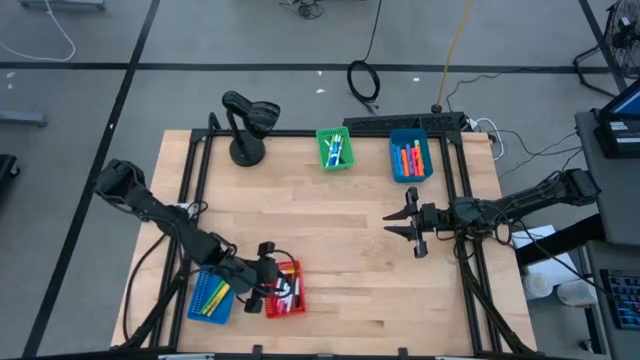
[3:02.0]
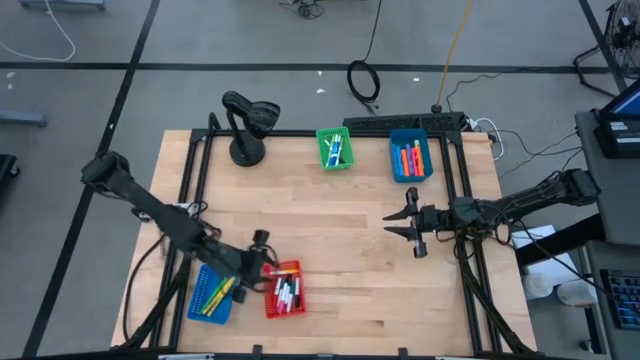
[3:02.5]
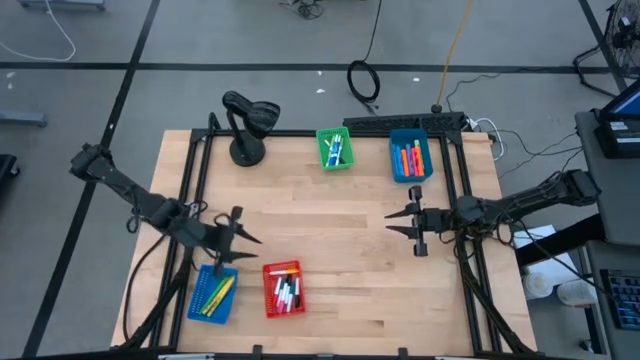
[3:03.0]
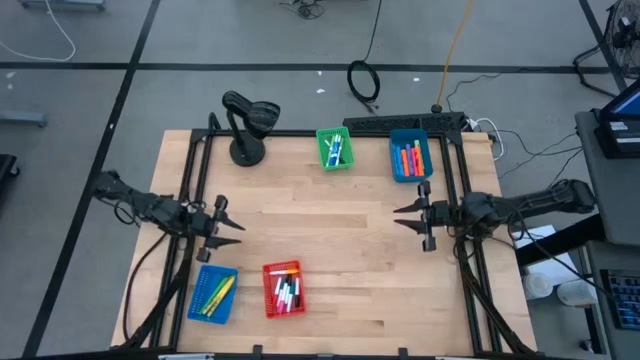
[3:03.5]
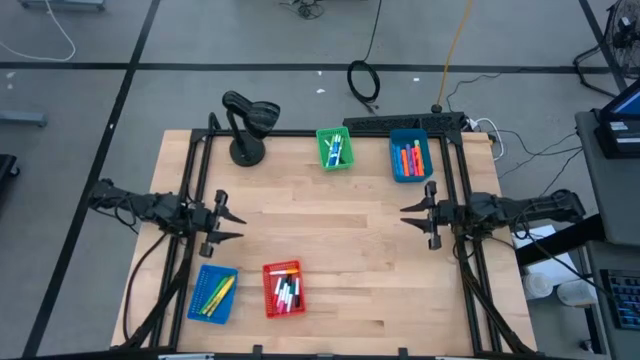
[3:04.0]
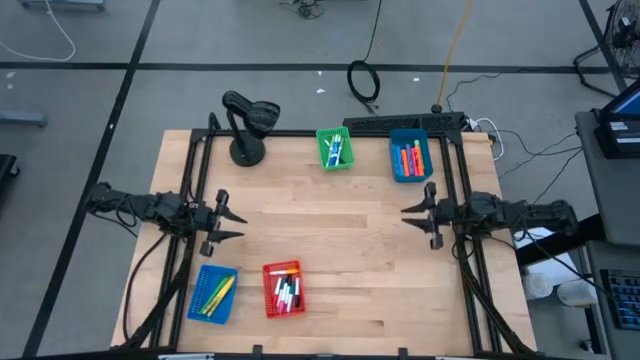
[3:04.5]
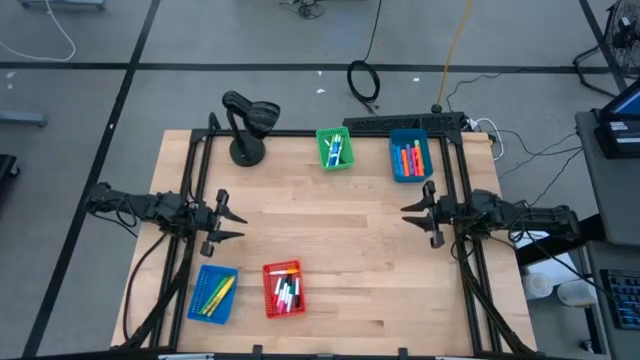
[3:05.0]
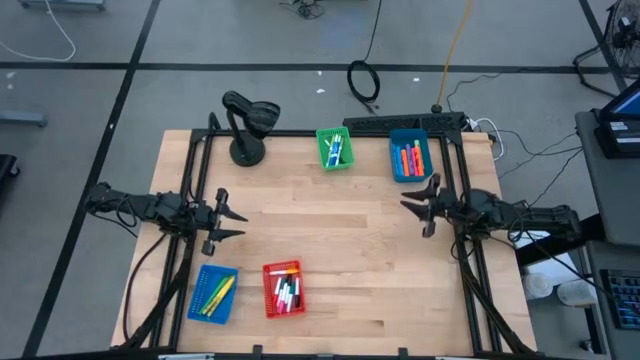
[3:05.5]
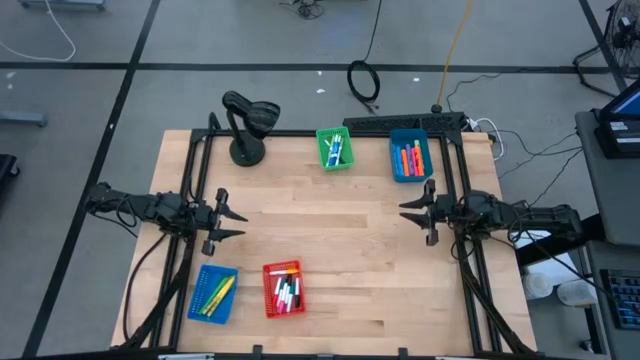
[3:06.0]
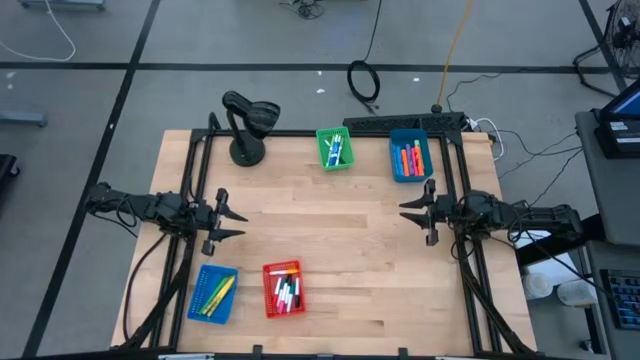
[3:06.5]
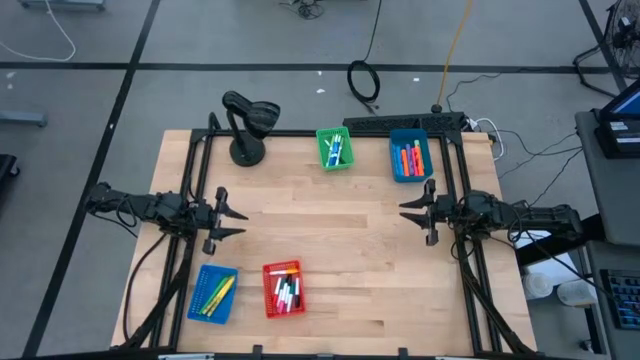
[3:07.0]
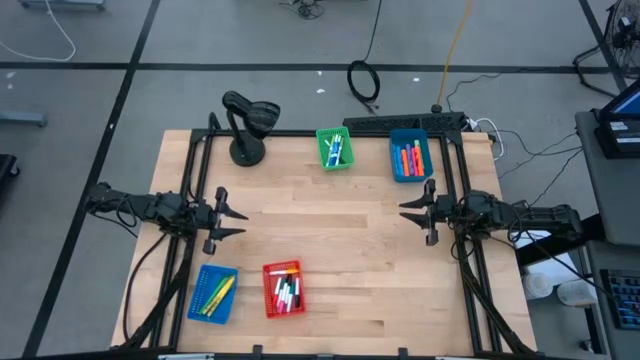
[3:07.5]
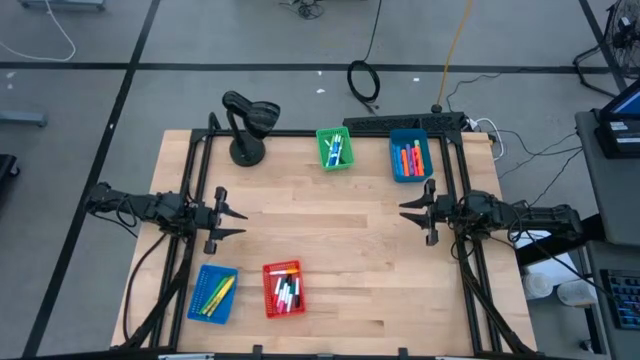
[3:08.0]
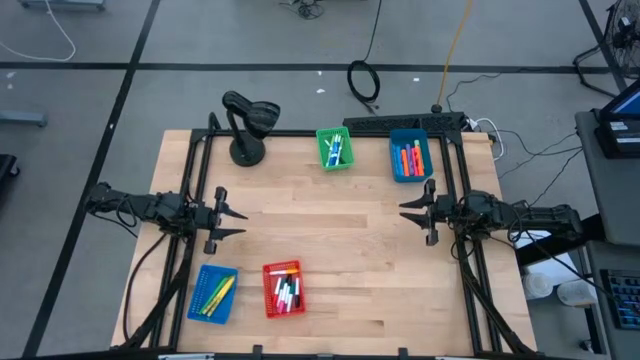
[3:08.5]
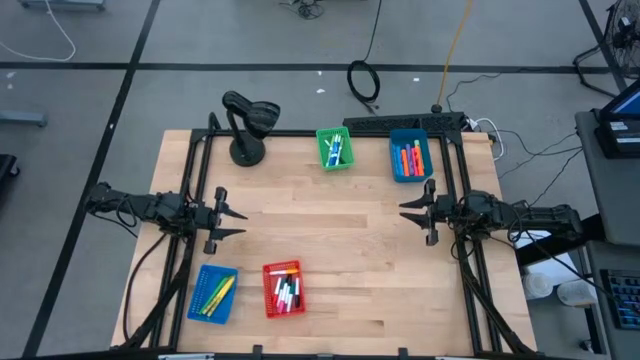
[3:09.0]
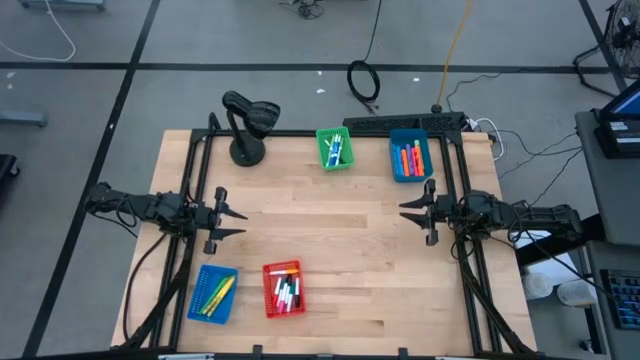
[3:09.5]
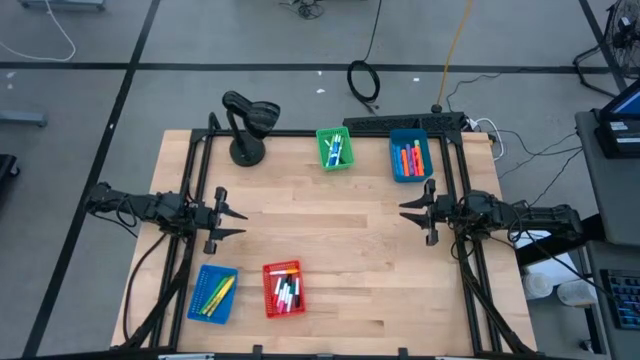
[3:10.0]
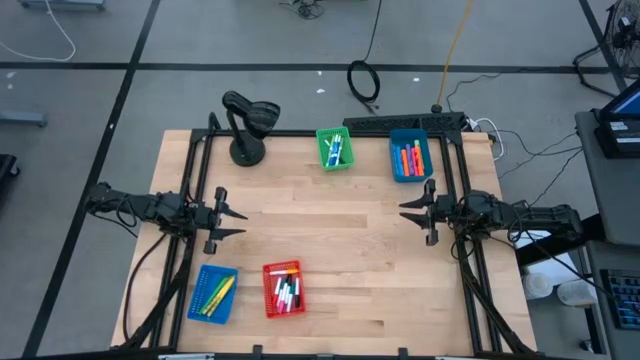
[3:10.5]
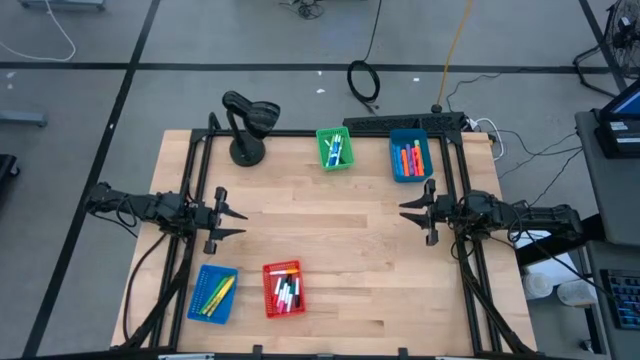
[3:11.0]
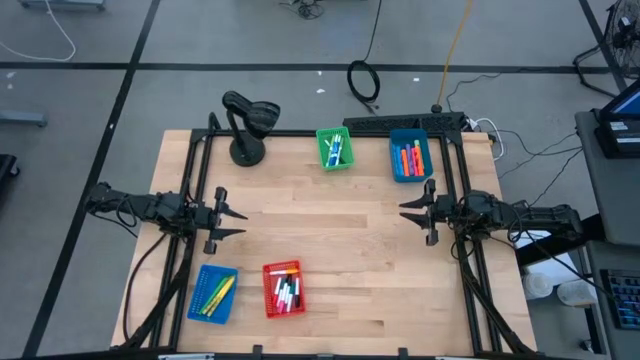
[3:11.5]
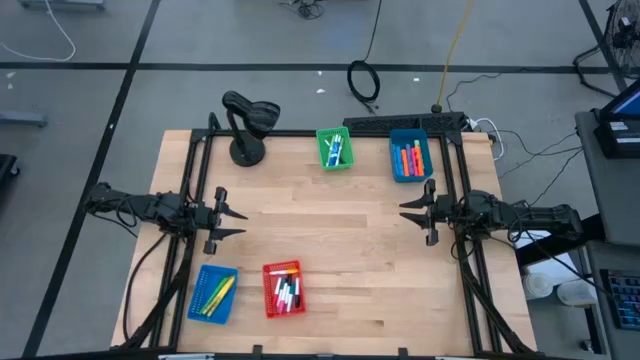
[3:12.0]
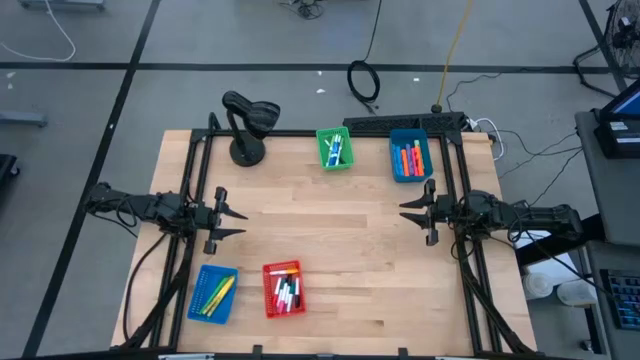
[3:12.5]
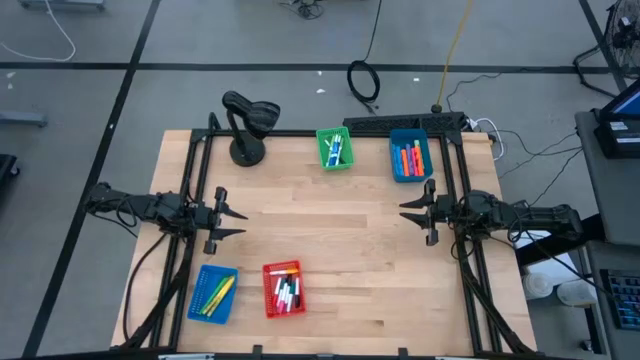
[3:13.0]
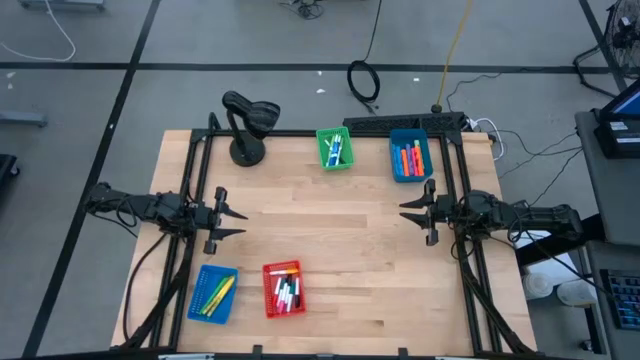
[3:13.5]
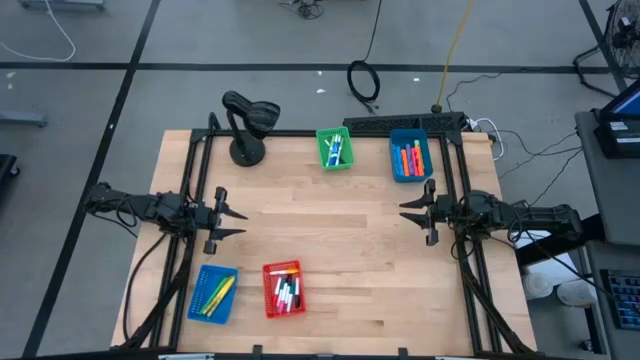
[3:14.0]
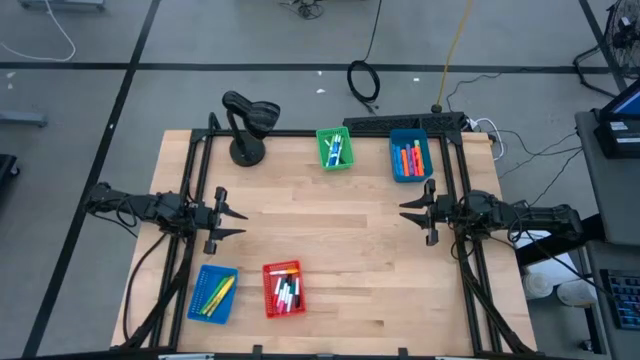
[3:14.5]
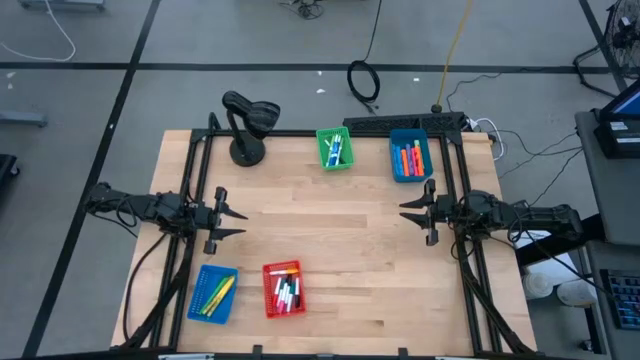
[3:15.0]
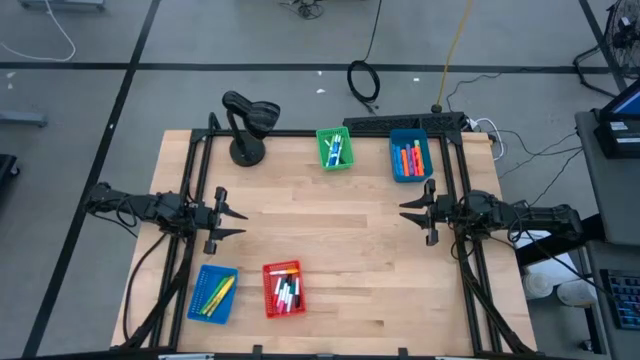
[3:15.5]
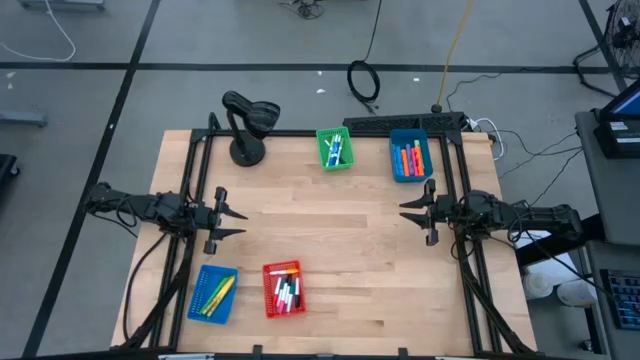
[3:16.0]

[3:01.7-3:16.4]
Task: Pick & Place Markers
Return to Home Position

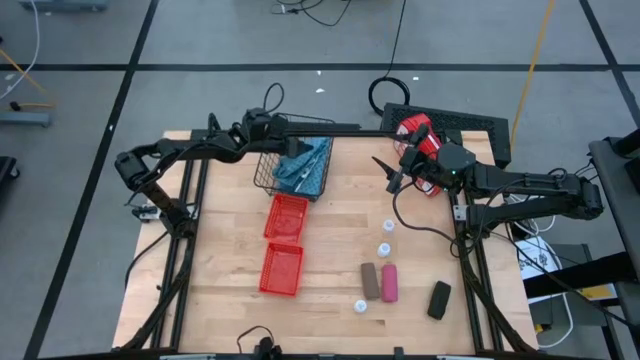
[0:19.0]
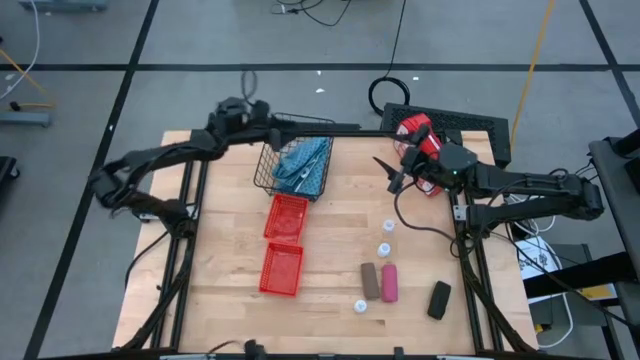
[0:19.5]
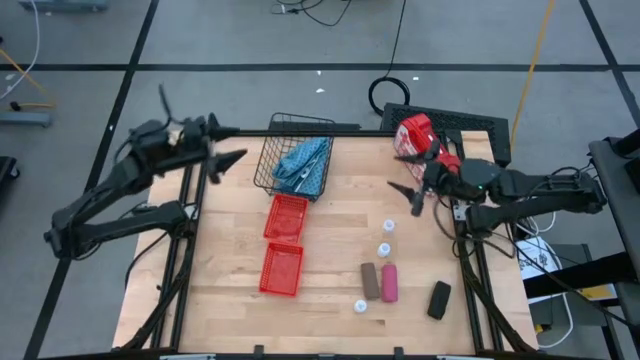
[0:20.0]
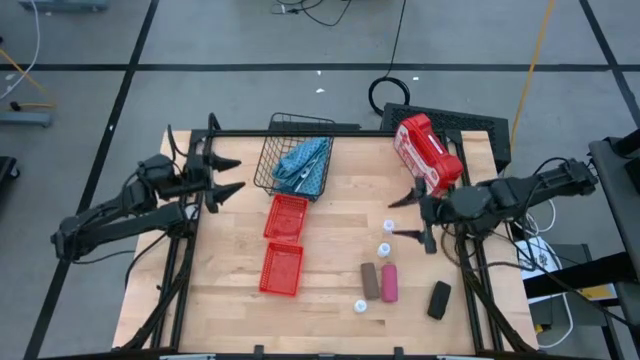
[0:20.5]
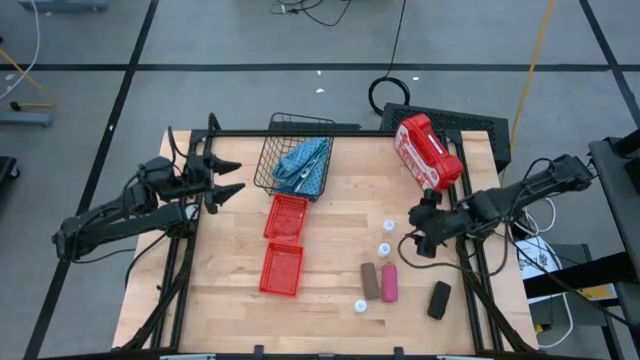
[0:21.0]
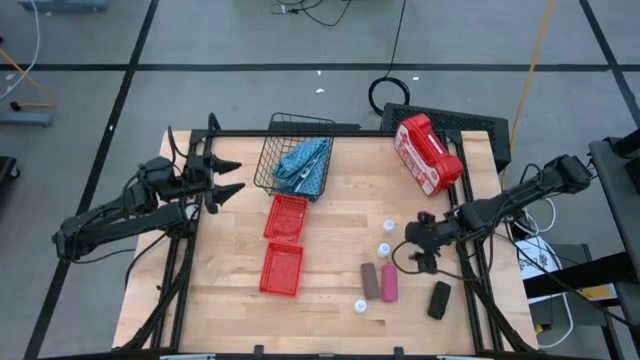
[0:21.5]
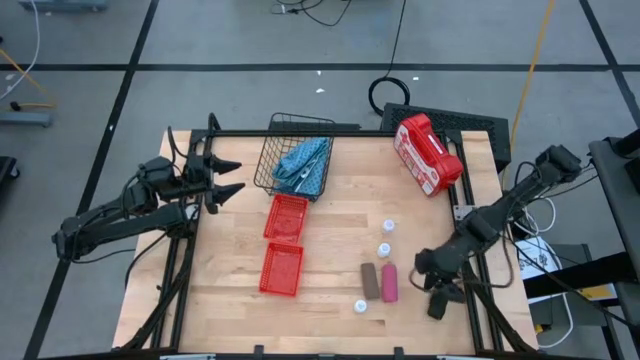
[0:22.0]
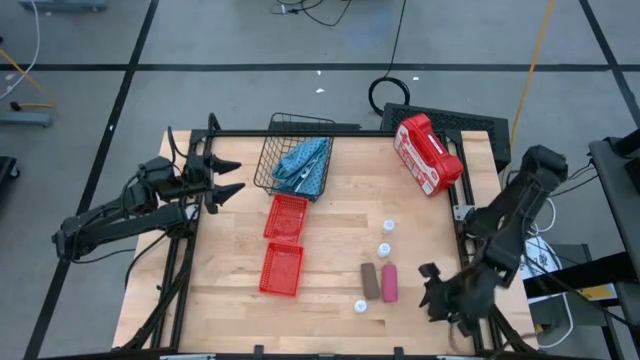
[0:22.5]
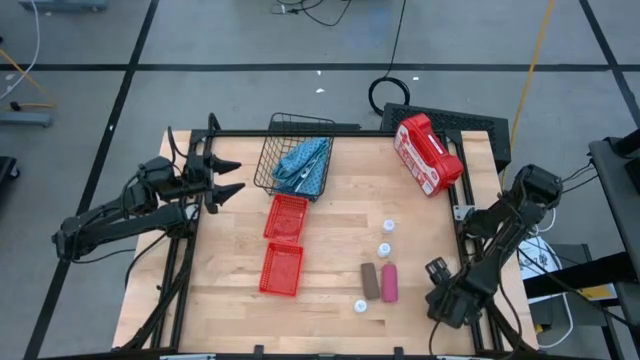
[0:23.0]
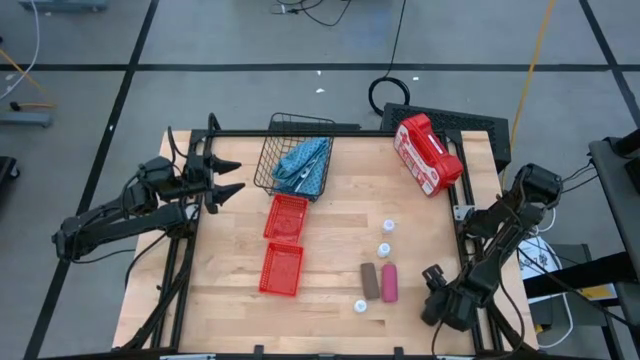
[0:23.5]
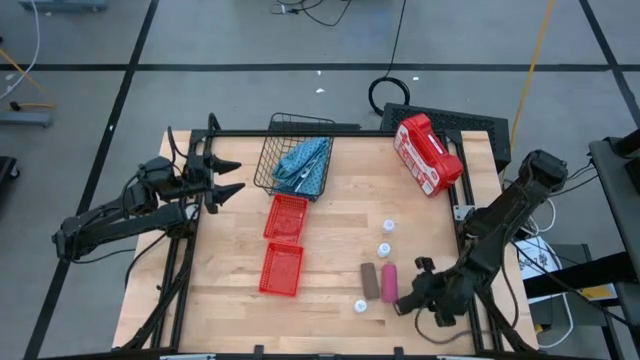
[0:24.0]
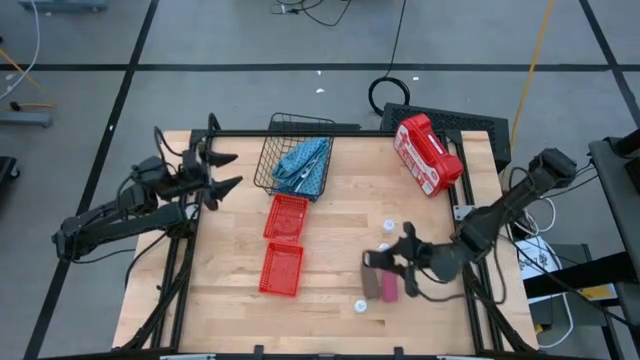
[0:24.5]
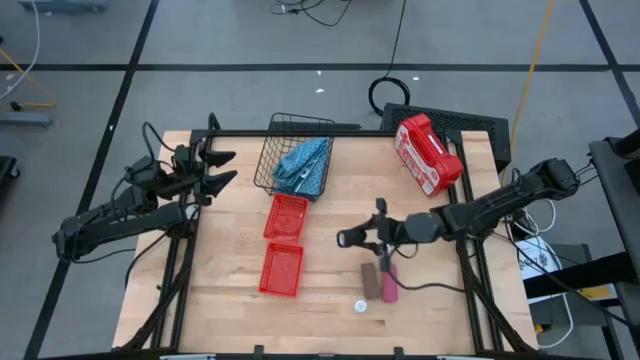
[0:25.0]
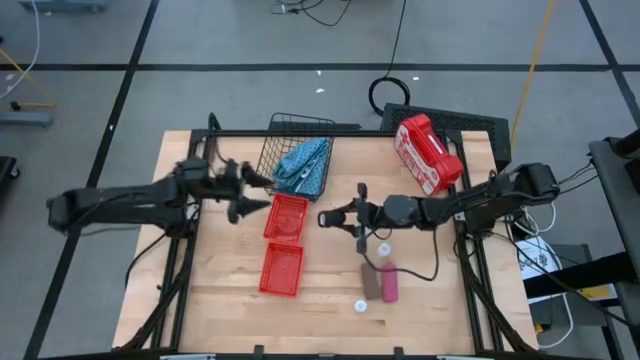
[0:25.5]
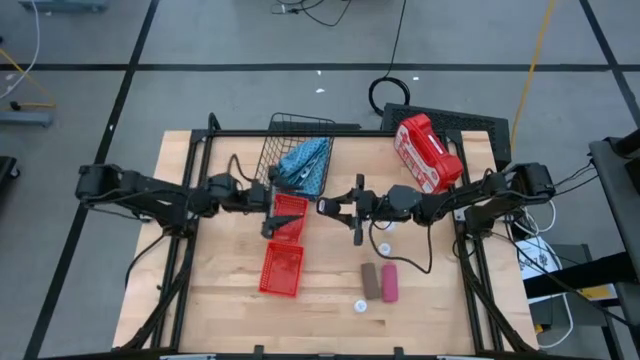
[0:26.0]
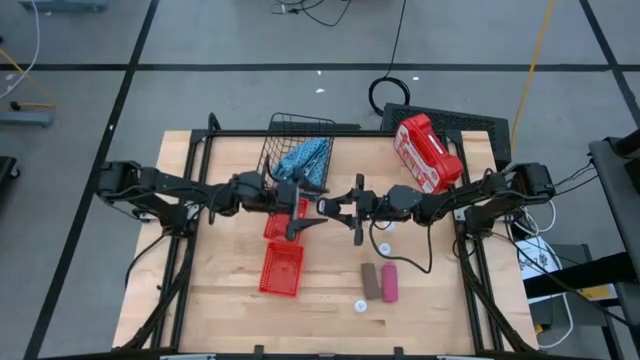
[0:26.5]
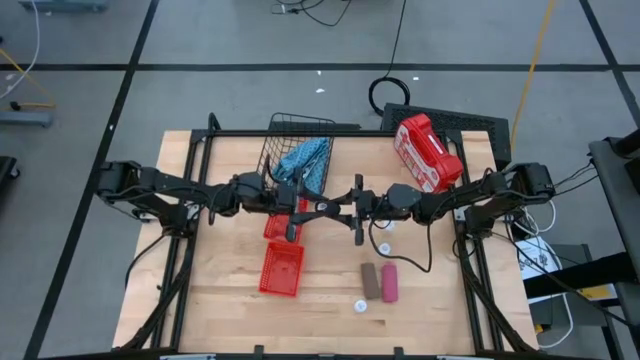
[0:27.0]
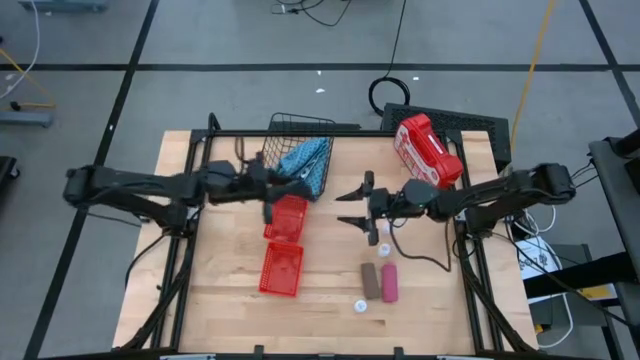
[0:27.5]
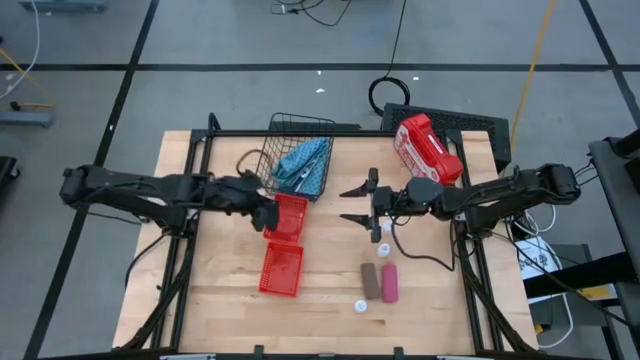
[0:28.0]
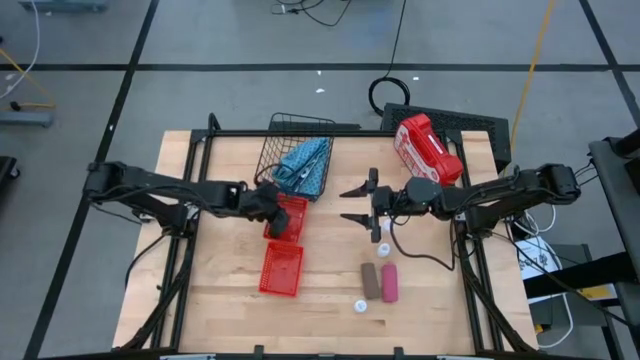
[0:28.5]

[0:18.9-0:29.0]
Task: Pick & place medical supplies in basket/bin
Put the black bandage into the top red bin
